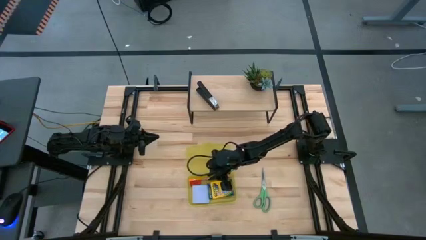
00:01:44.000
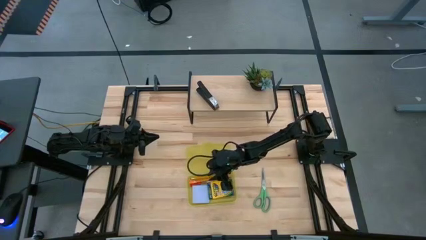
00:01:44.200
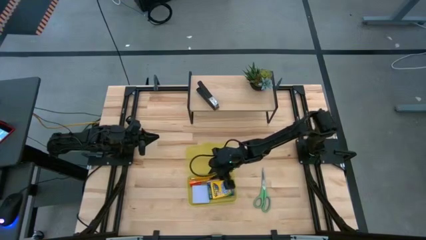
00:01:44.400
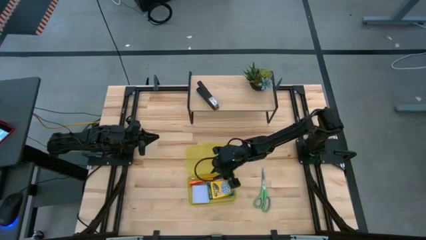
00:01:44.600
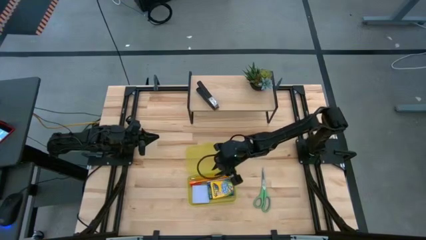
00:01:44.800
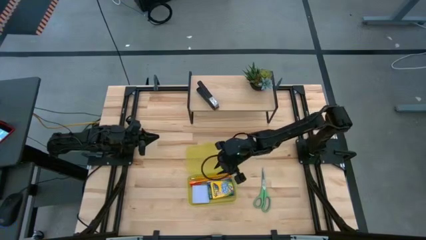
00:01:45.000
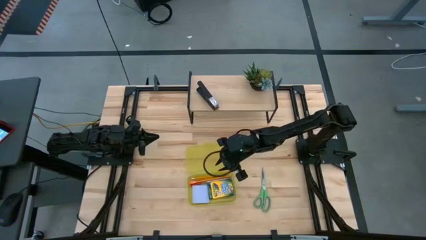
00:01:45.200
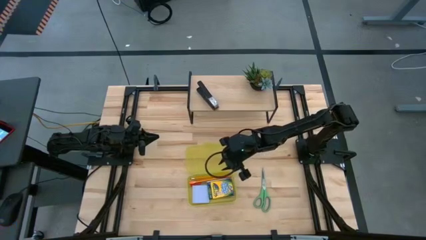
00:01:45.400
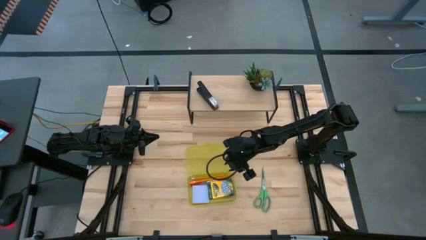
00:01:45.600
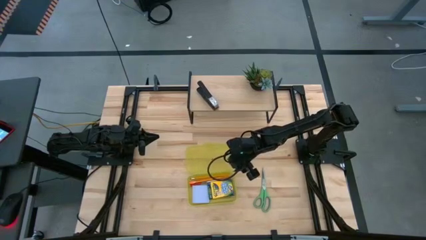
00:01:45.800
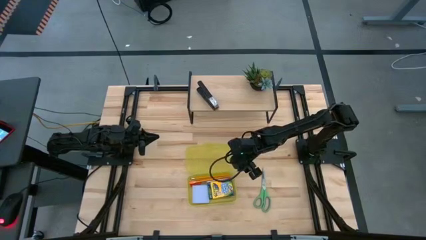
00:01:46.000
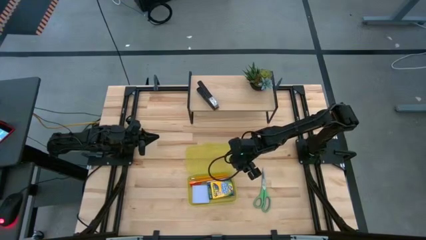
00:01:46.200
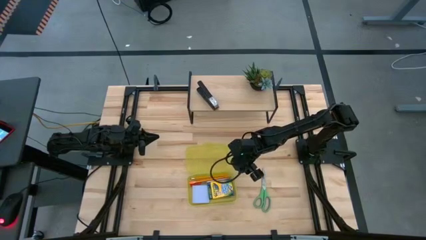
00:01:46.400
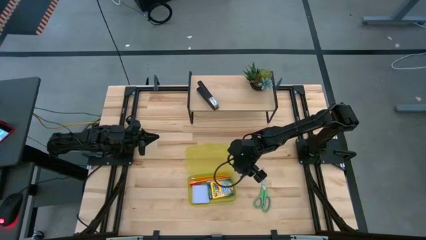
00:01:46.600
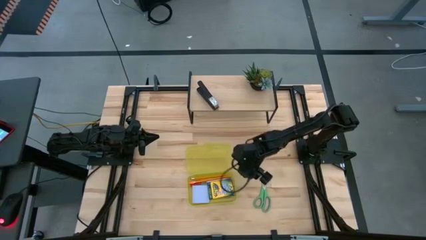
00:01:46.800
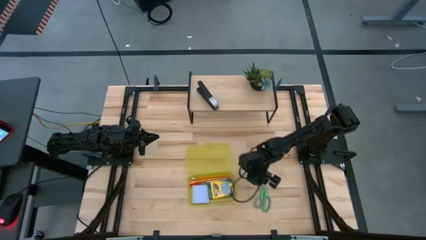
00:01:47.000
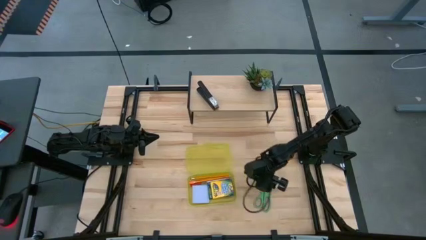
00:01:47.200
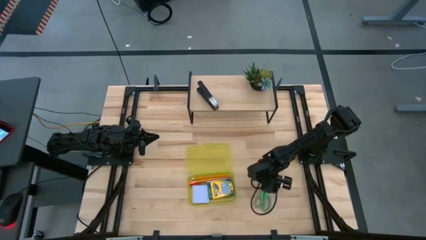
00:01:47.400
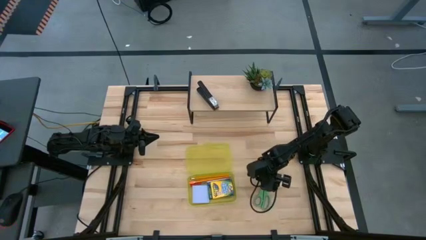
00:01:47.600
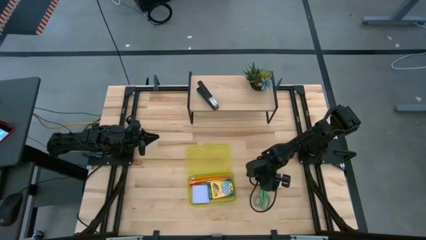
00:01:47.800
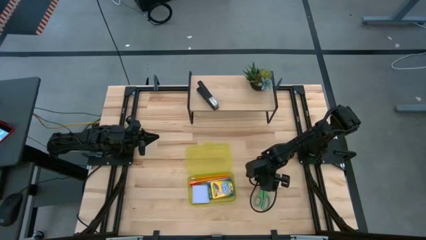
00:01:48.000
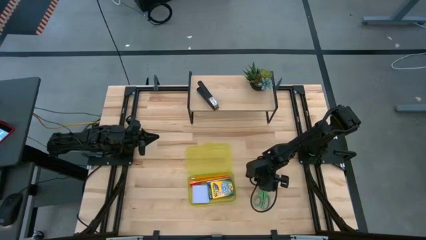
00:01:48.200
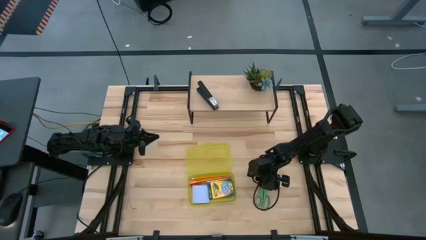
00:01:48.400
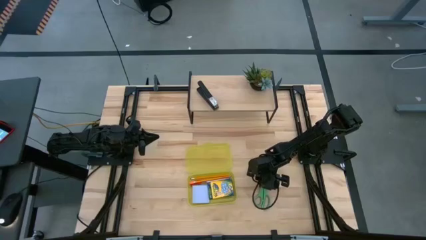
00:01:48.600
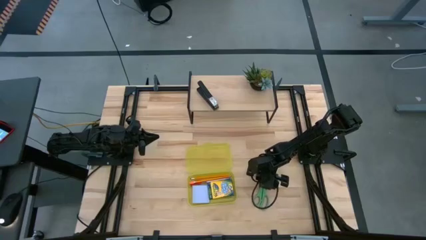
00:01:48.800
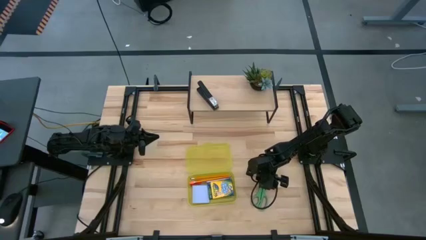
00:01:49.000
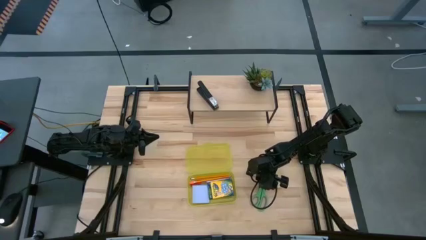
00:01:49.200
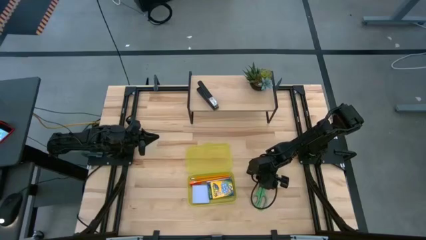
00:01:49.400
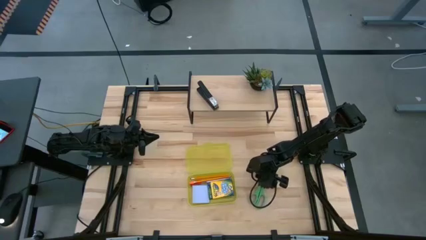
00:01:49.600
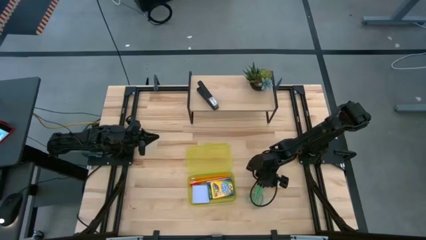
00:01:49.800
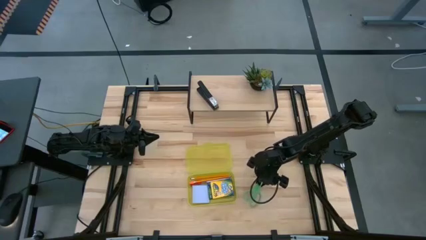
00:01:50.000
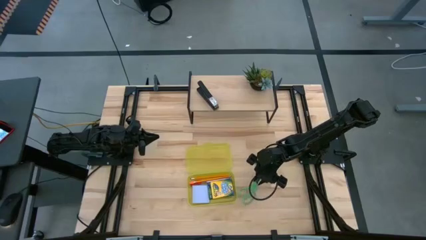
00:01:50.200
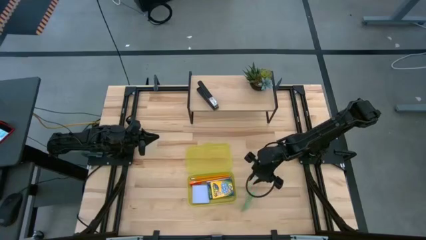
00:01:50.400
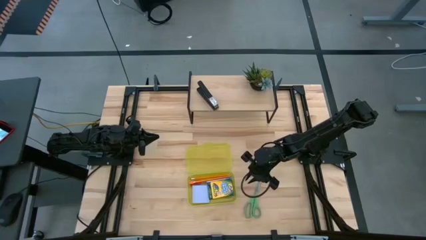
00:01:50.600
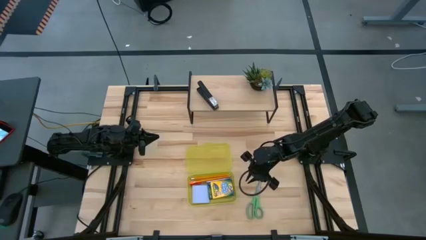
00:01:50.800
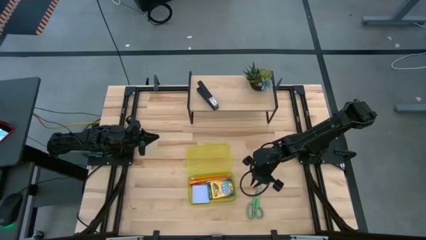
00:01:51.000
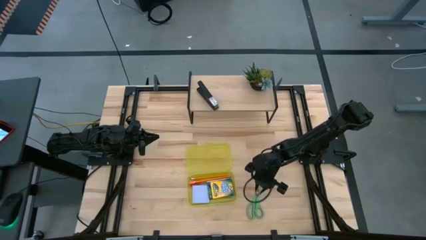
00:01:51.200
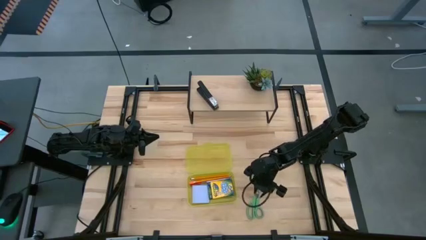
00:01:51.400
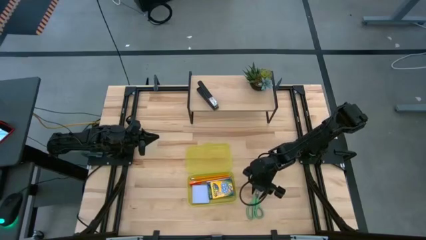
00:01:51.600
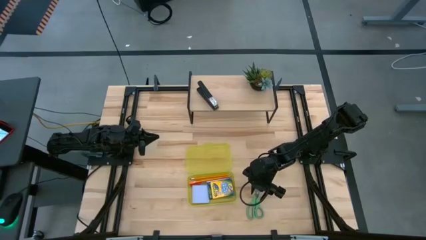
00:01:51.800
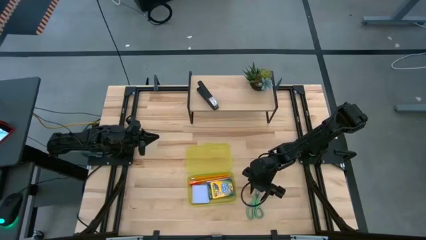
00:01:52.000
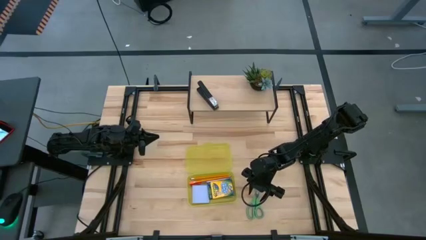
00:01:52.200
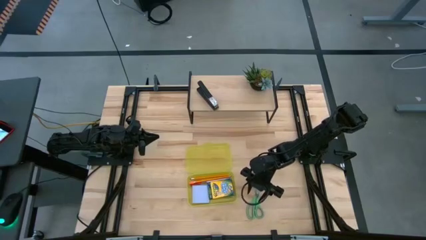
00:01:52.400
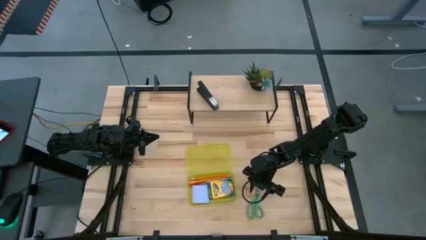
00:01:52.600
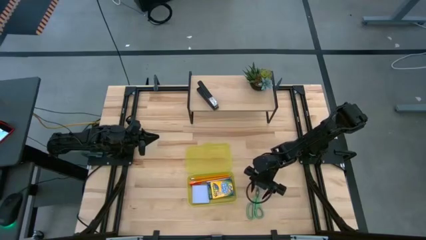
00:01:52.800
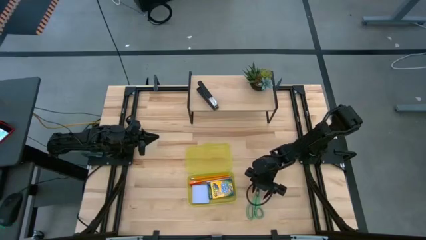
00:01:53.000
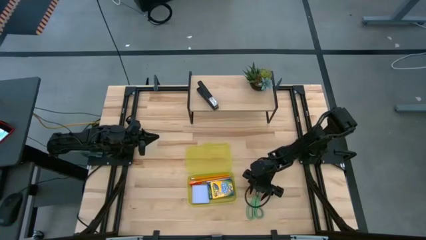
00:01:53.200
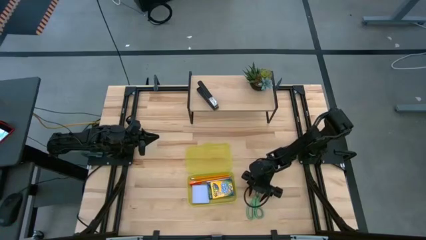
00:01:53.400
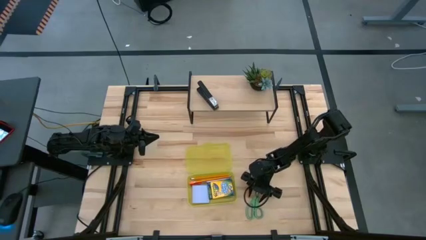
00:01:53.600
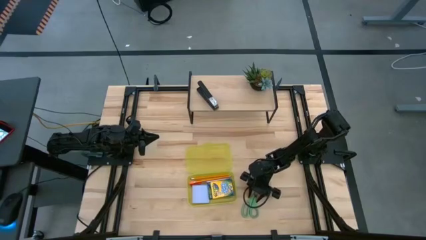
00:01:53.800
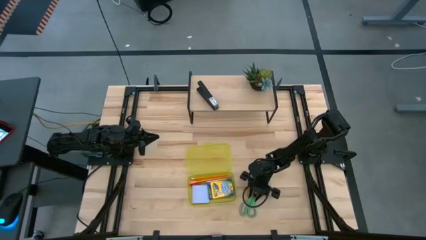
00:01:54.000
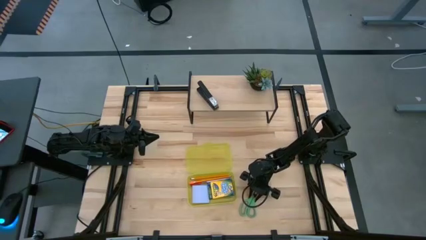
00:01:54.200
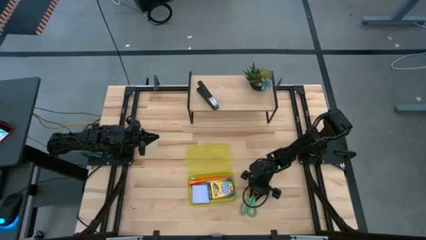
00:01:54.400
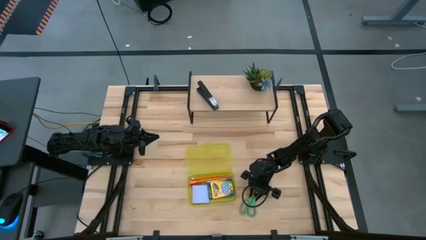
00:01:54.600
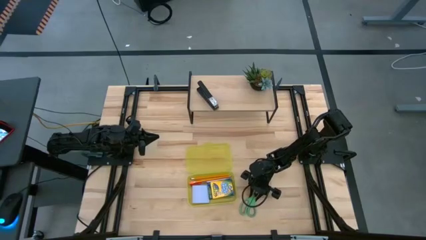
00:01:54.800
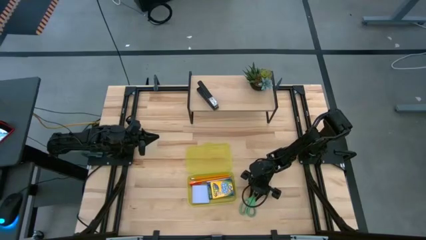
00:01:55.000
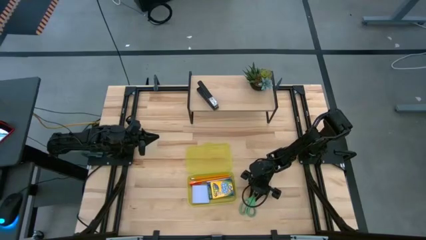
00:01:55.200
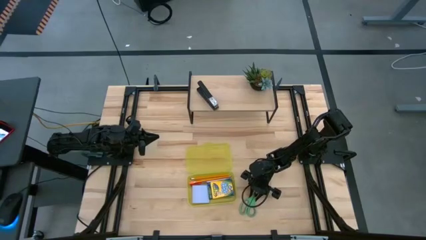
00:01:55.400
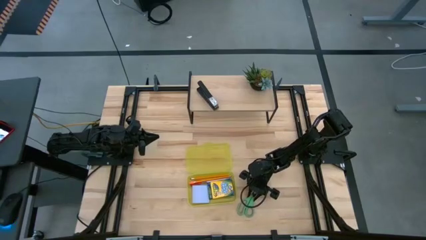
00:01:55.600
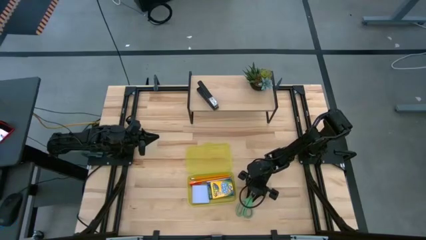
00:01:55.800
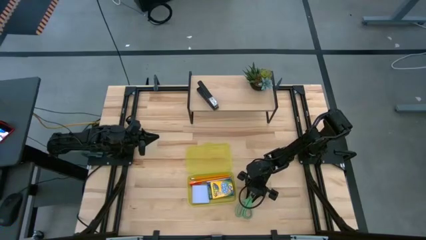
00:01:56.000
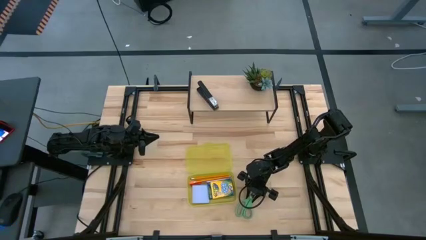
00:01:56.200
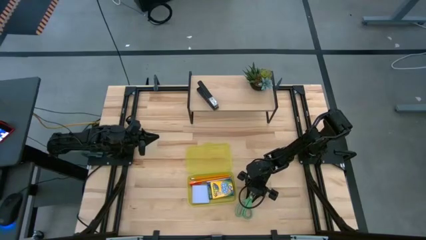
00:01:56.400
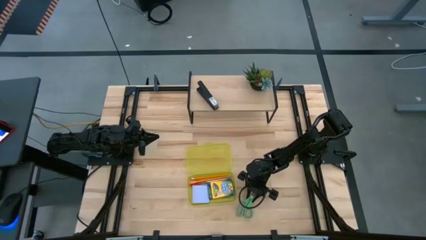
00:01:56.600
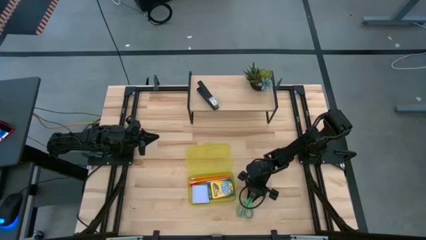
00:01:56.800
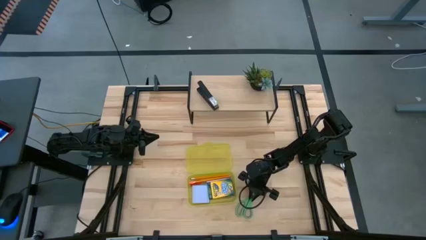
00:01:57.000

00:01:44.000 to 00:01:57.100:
Task: Pack school essentials
Put the green scissor into the yellow supply box
